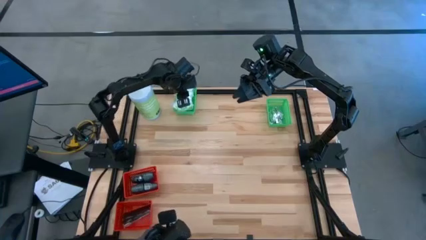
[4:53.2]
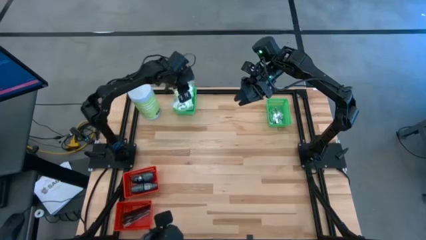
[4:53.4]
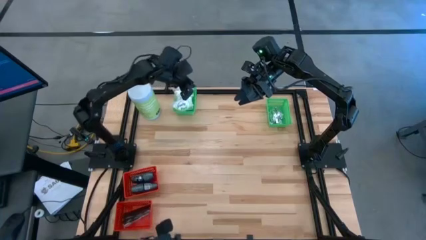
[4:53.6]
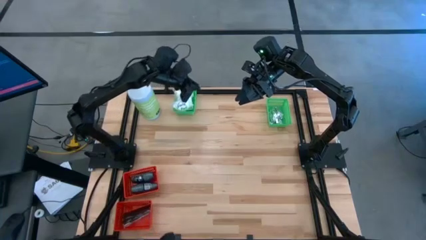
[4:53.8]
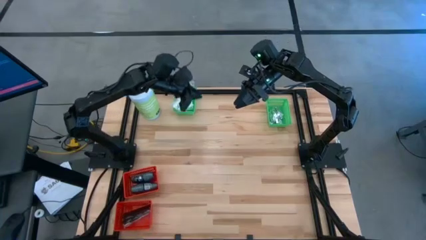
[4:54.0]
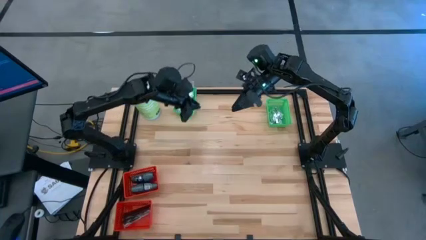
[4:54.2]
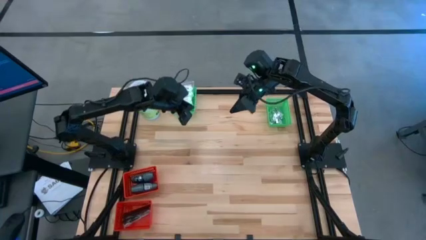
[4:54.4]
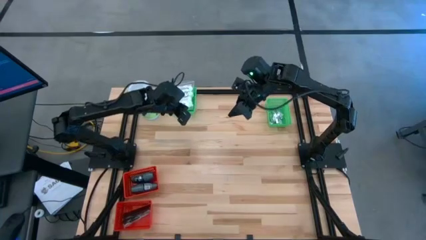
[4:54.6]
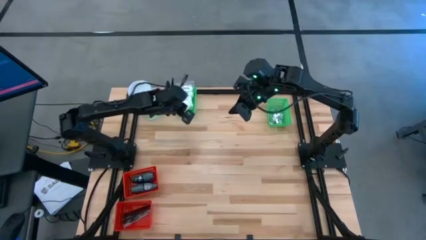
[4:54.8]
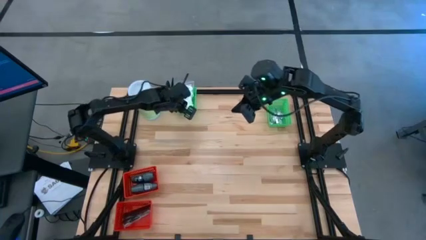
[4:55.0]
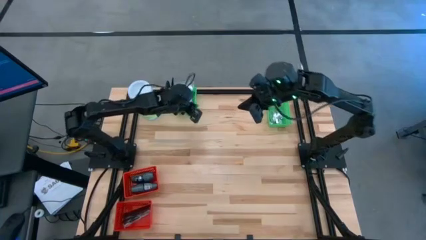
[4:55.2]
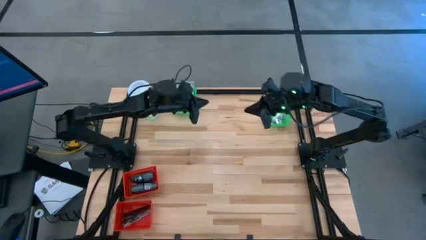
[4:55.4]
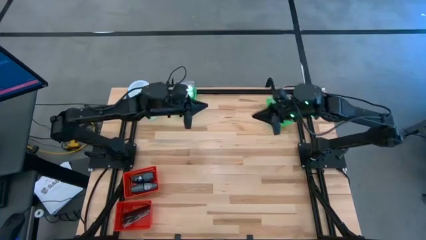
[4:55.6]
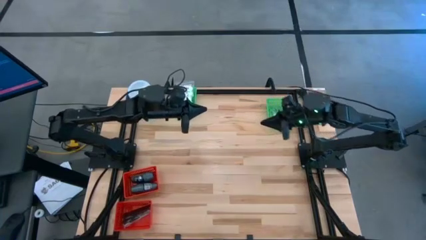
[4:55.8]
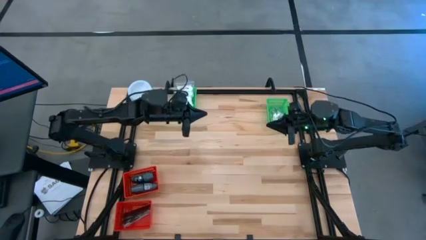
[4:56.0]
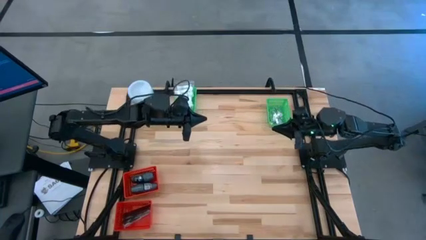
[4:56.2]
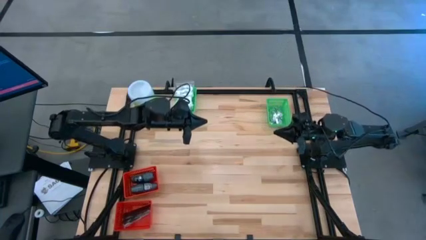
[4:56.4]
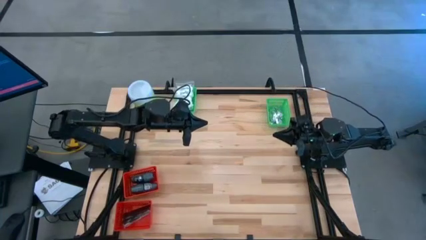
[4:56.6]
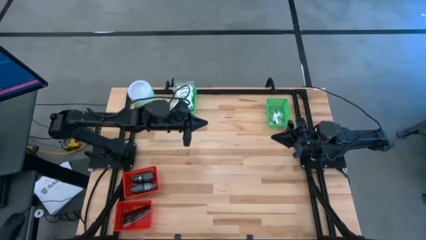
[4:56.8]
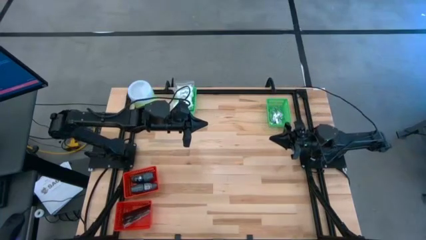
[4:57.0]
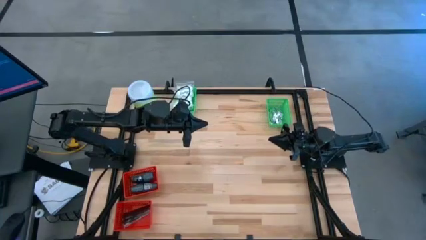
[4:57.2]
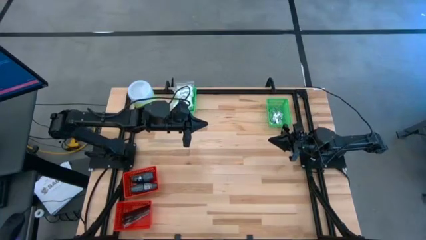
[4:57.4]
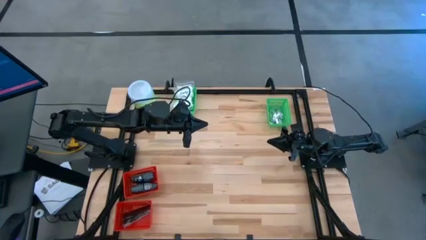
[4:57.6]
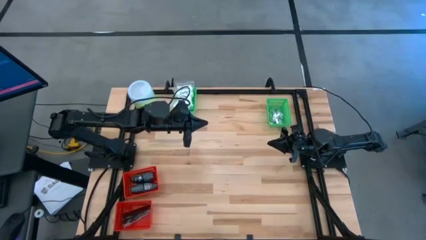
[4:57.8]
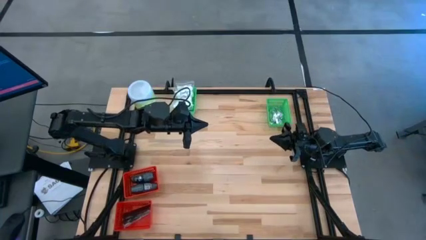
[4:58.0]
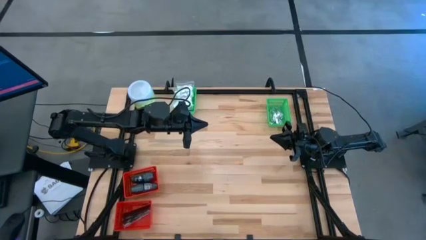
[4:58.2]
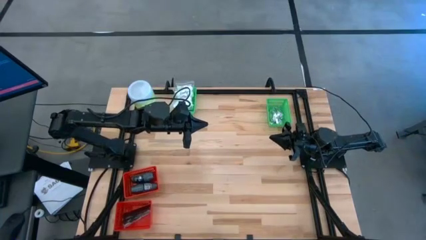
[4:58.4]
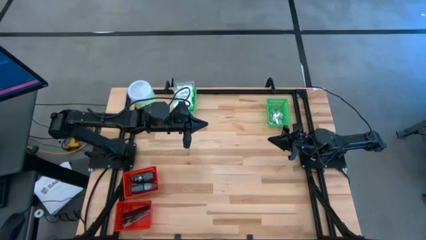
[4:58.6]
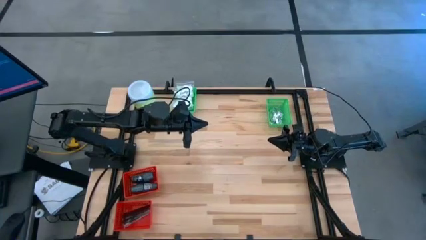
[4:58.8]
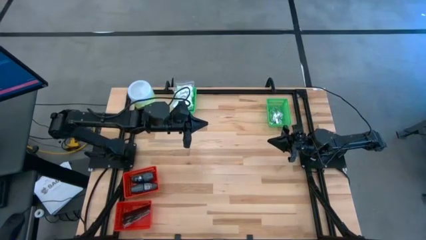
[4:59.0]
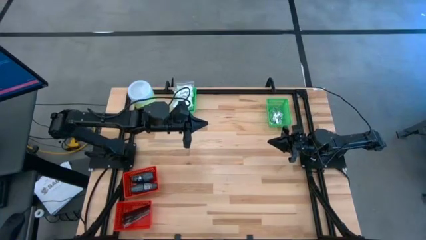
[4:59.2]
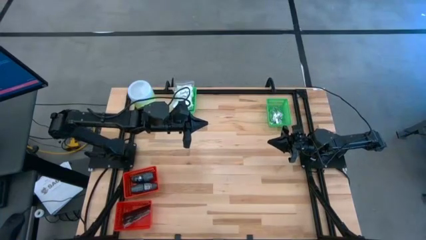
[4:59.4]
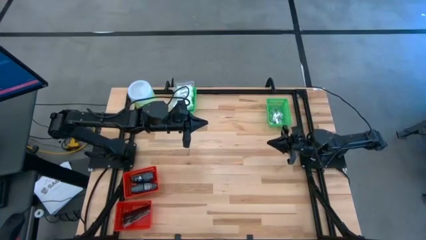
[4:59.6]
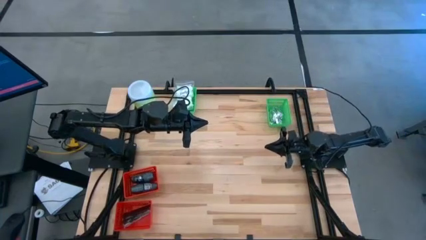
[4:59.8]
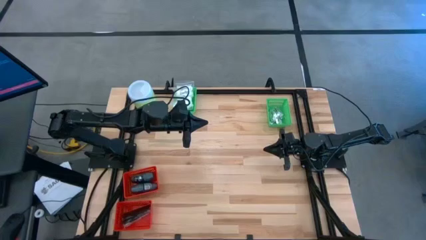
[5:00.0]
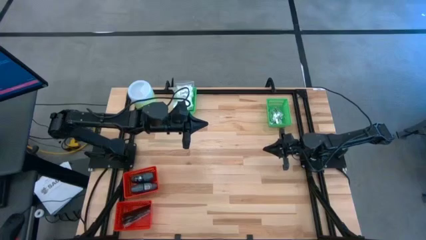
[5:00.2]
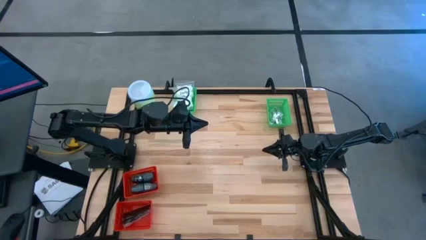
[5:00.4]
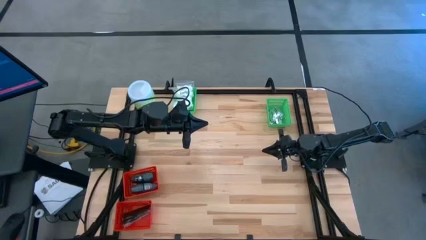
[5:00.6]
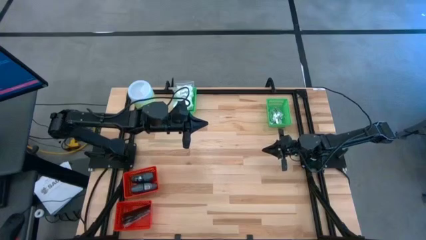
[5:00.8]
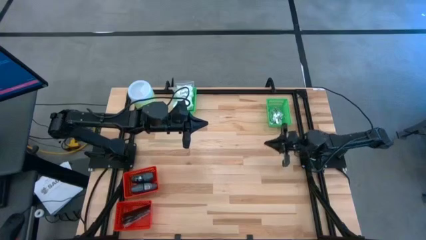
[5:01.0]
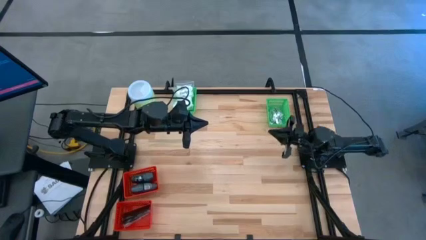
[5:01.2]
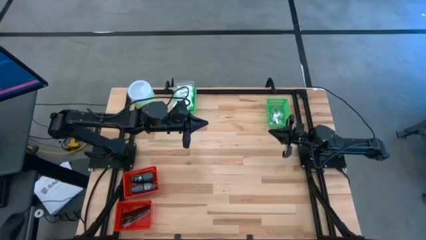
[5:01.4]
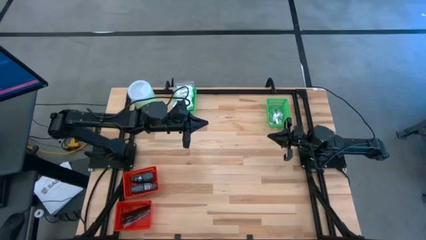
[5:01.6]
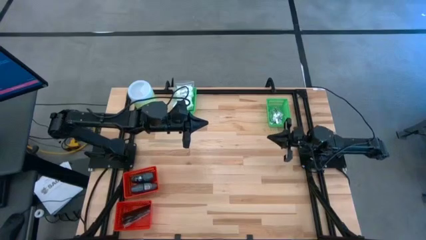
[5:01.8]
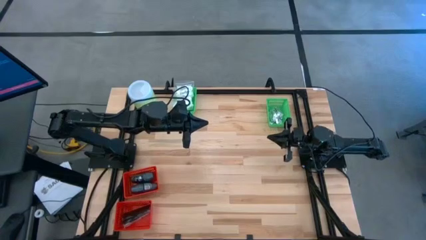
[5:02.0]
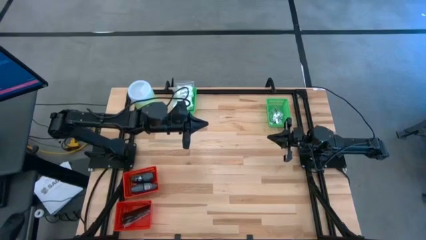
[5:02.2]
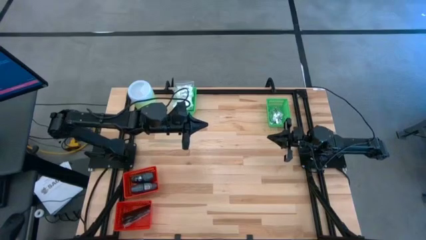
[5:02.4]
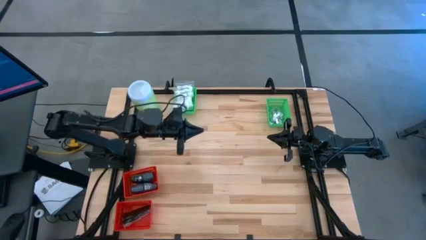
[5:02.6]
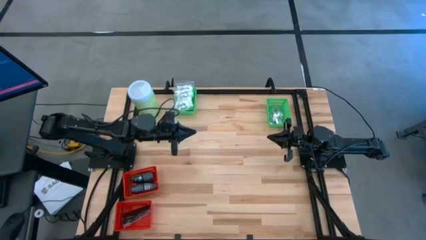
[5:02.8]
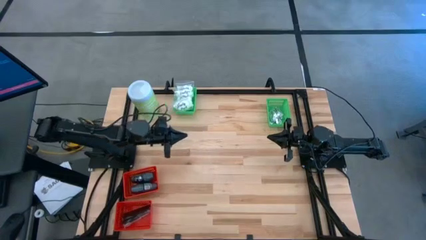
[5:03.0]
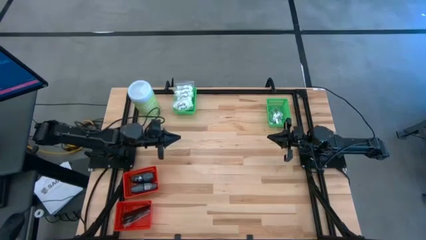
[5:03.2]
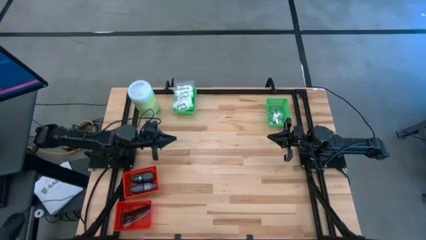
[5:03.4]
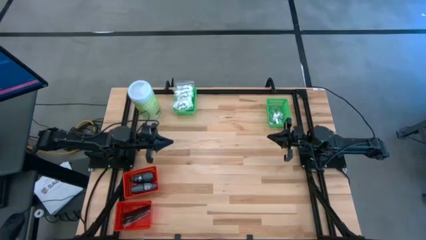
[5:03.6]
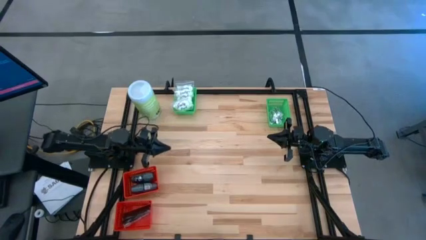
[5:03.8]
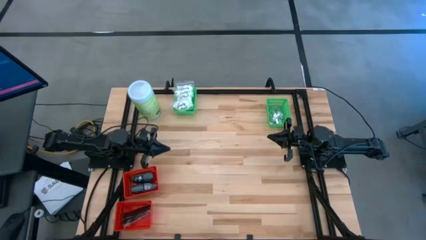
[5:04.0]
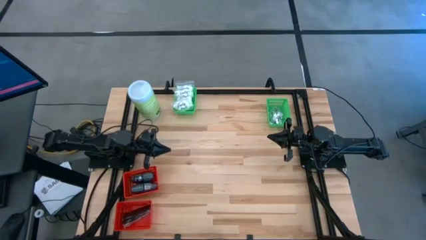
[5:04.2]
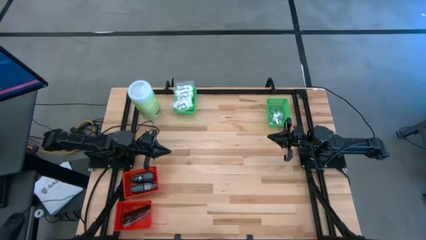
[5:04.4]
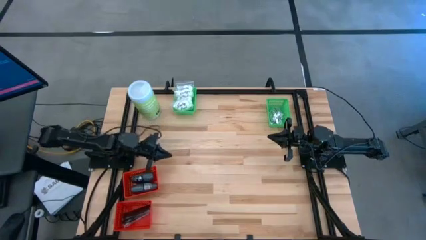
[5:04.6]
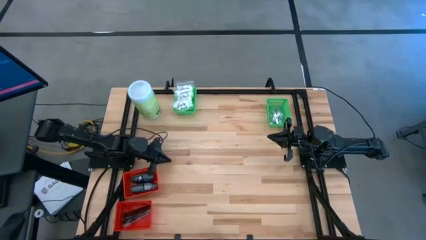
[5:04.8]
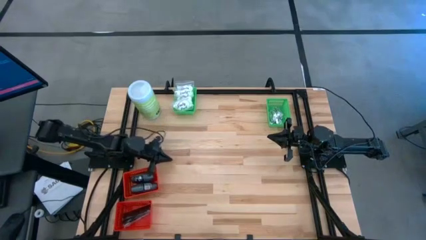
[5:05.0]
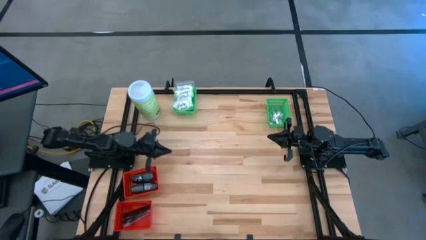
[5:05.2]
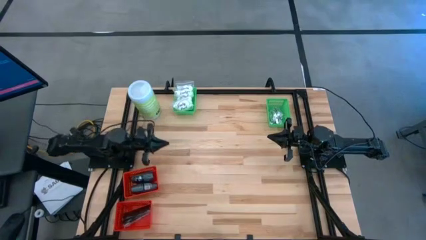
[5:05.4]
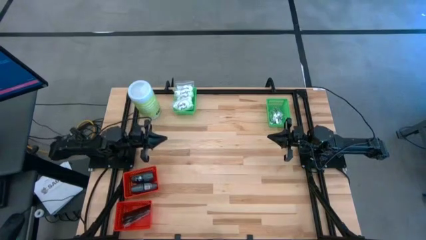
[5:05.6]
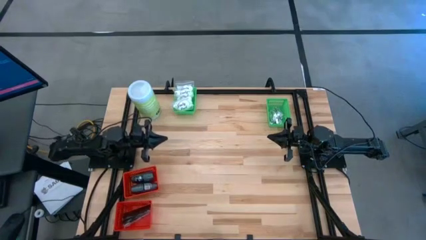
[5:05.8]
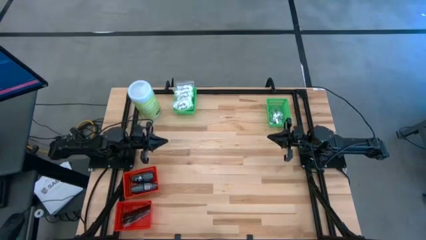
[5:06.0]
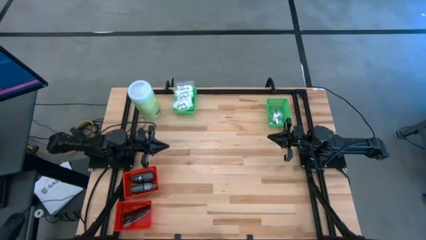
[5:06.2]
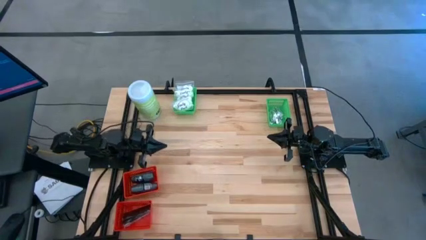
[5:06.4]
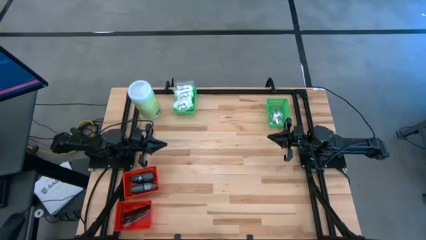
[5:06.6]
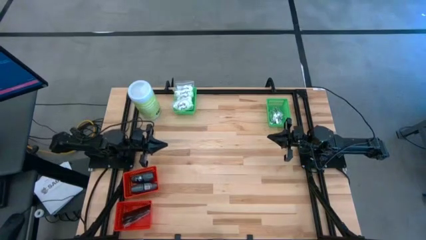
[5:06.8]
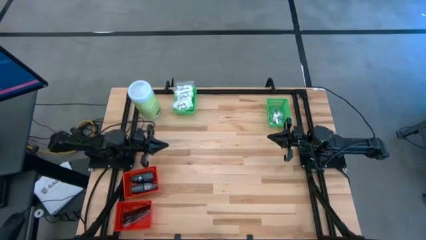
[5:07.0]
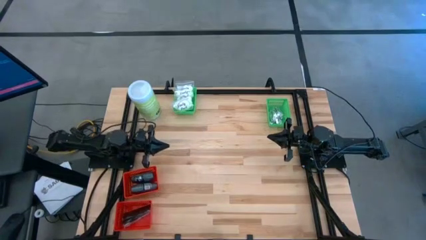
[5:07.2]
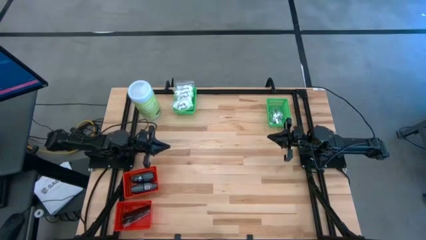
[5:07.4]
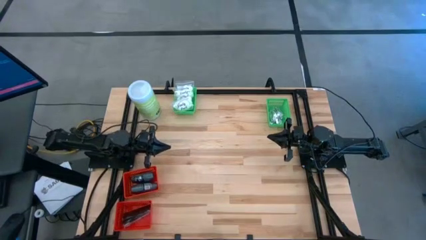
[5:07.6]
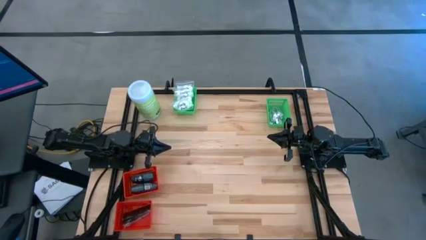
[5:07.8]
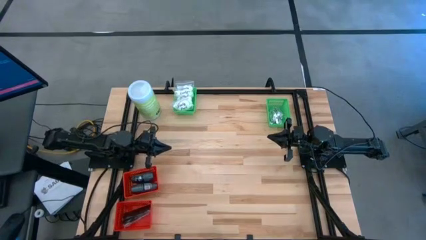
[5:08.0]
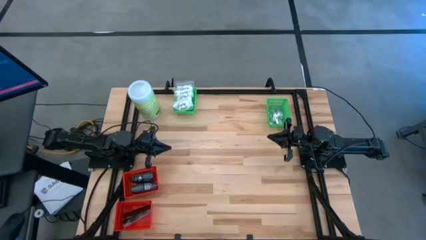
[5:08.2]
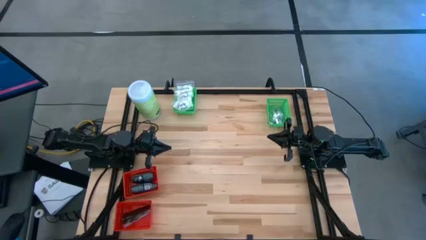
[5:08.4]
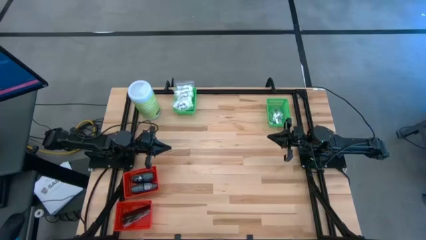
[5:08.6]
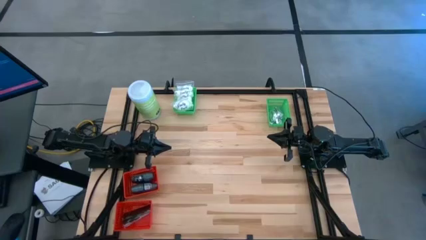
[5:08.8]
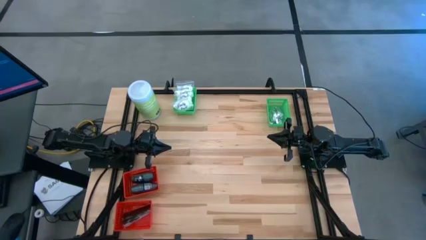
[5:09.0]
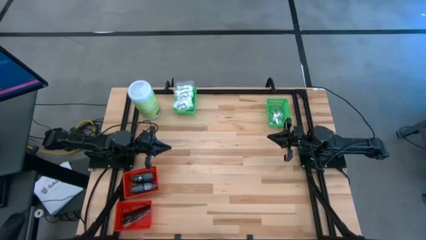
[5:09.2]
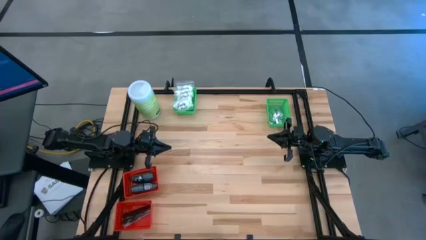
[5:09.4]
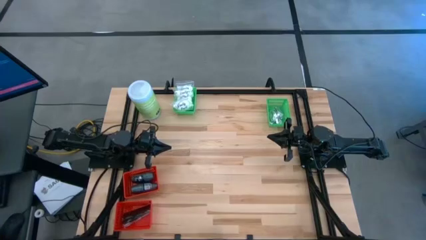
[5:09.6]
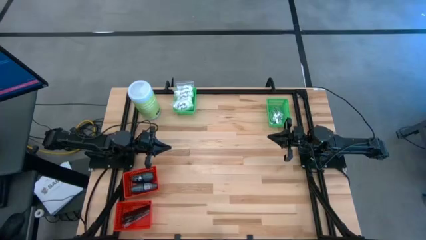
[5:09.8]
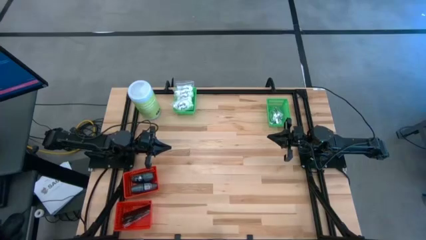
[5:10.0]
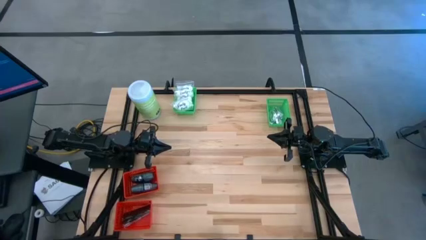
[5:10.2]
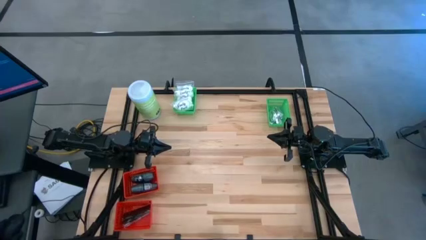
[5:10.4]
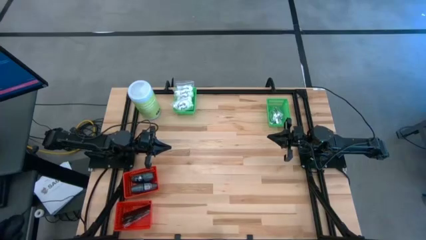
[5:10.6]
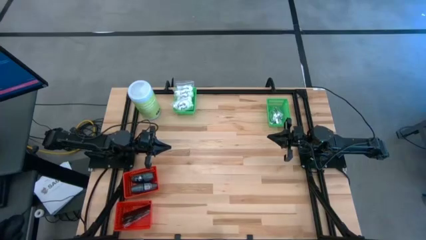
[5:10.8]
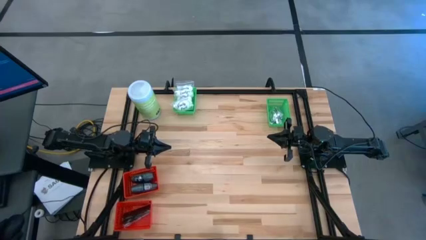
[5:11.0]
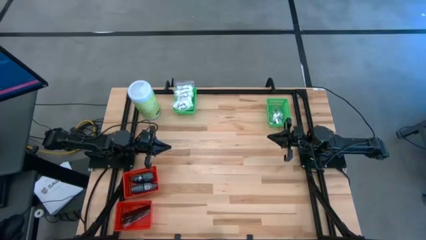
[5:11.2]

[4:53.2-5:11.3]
Task: Pick & Place Travel size toiletries
Return to Home Position
